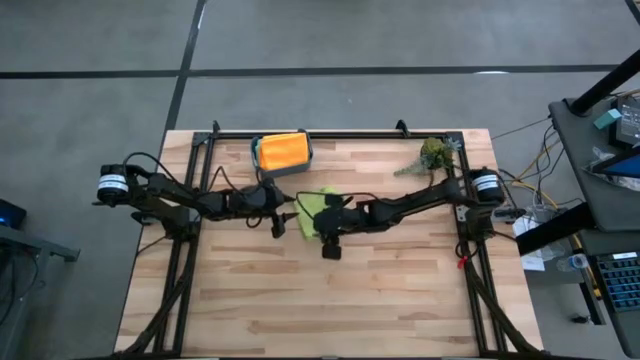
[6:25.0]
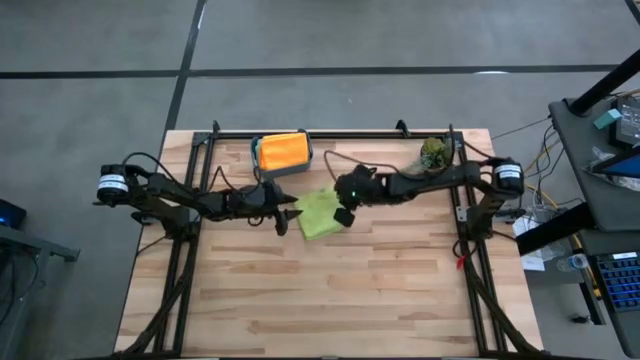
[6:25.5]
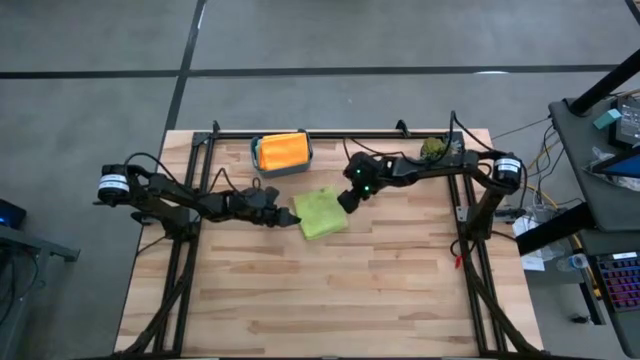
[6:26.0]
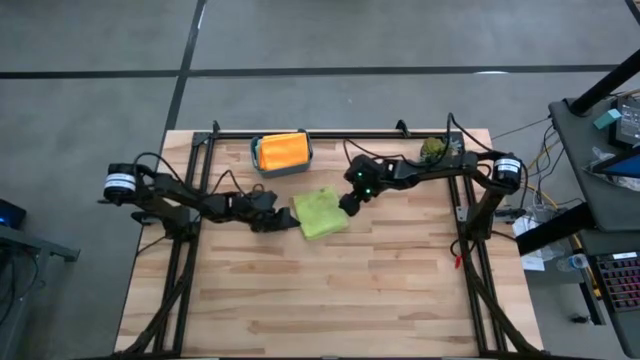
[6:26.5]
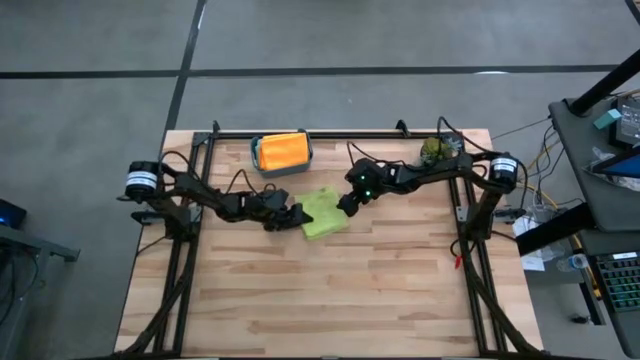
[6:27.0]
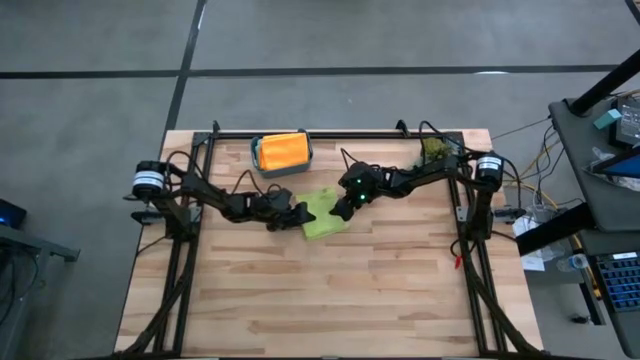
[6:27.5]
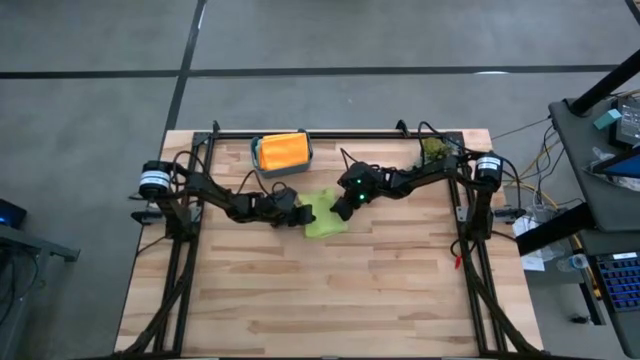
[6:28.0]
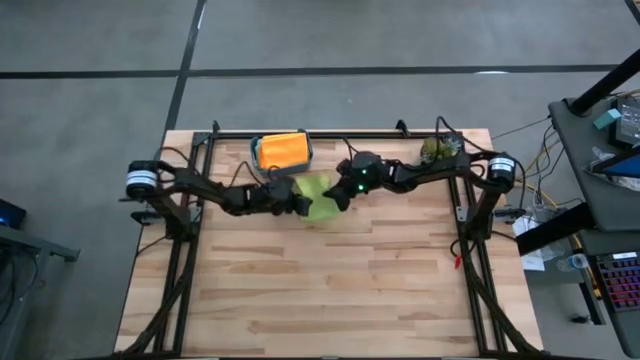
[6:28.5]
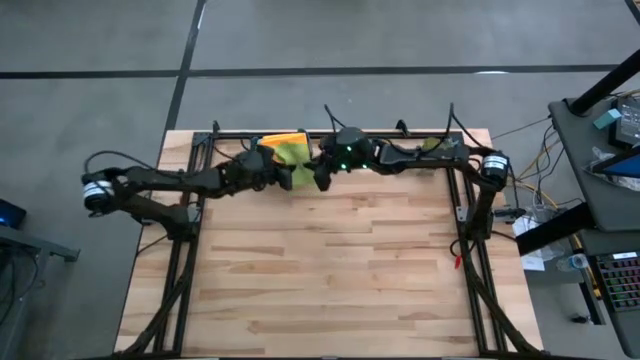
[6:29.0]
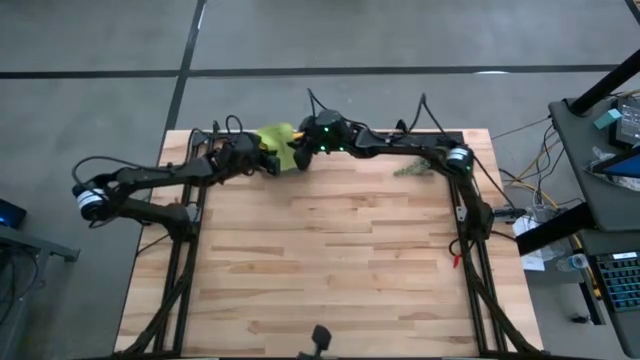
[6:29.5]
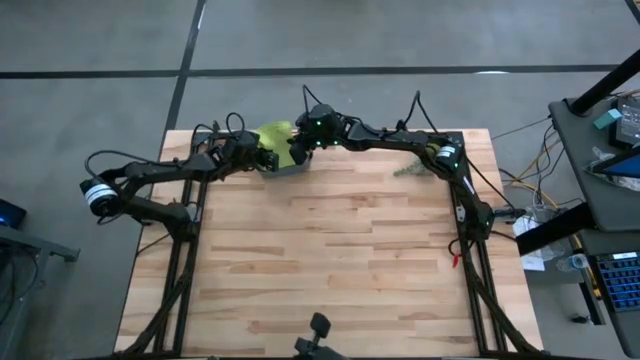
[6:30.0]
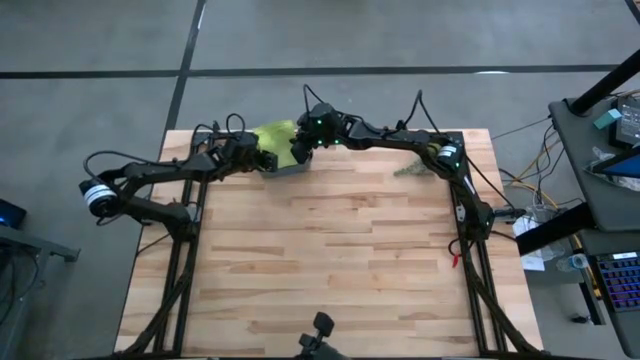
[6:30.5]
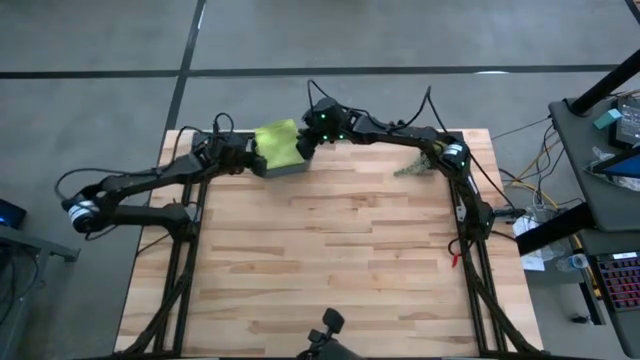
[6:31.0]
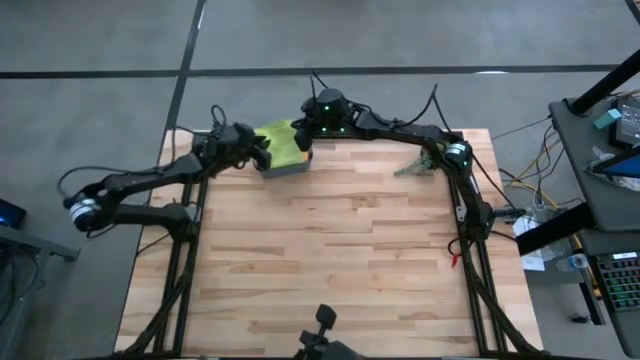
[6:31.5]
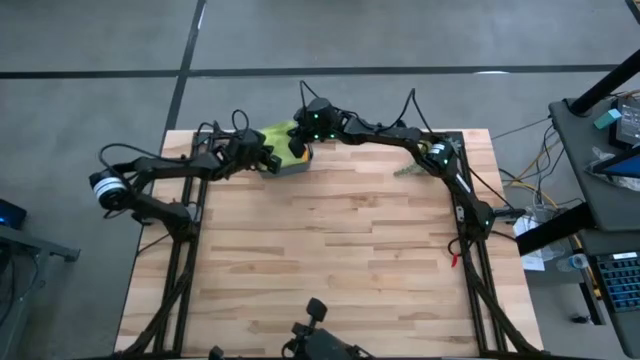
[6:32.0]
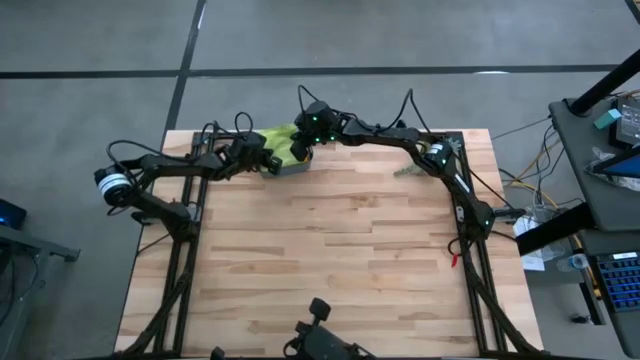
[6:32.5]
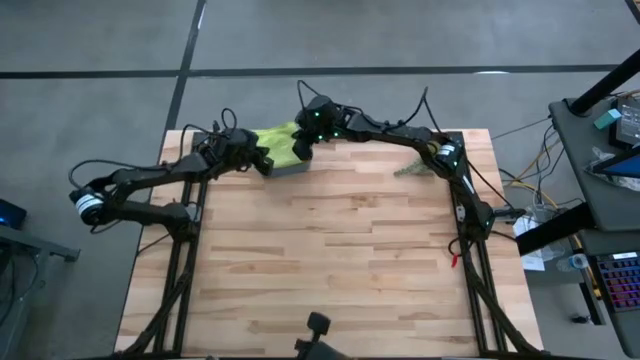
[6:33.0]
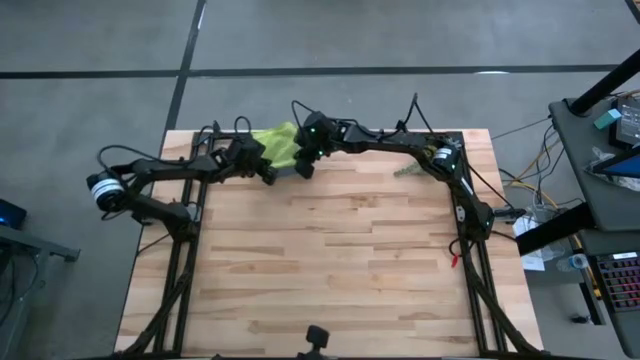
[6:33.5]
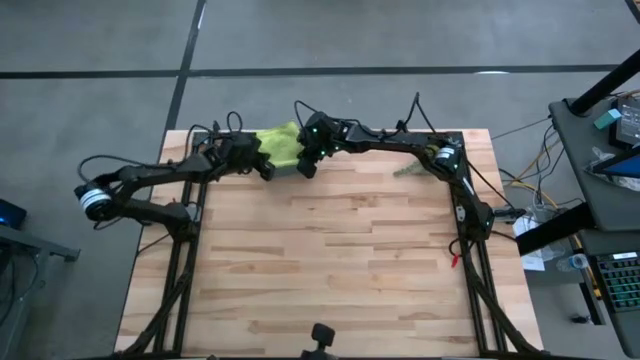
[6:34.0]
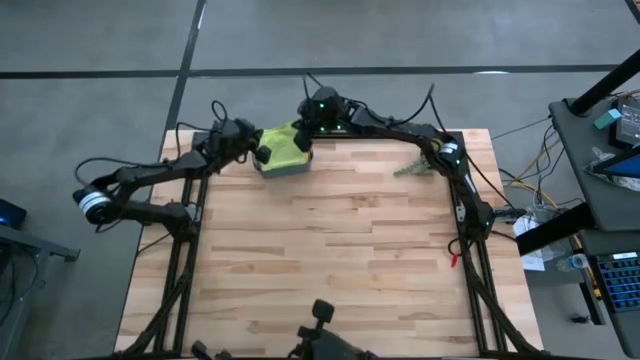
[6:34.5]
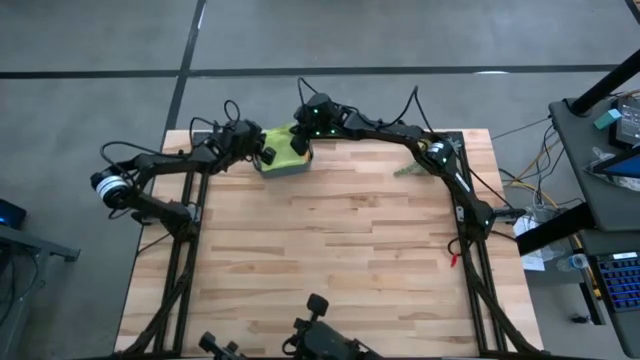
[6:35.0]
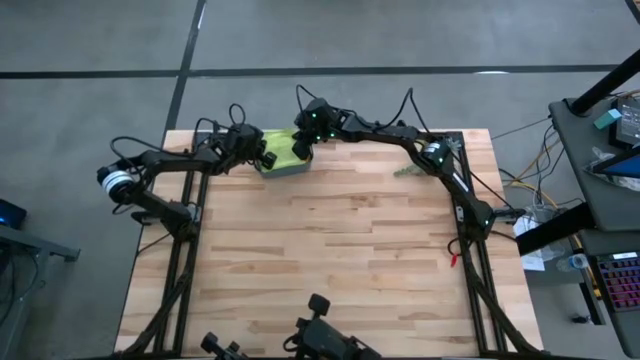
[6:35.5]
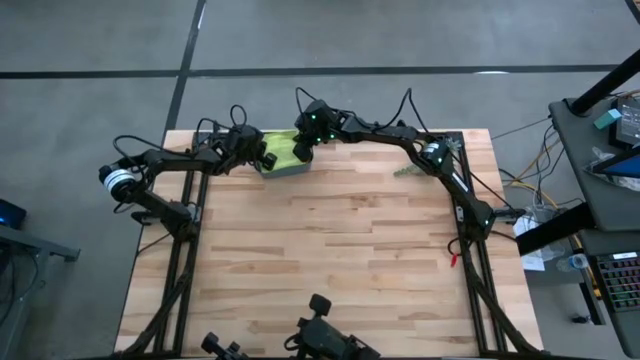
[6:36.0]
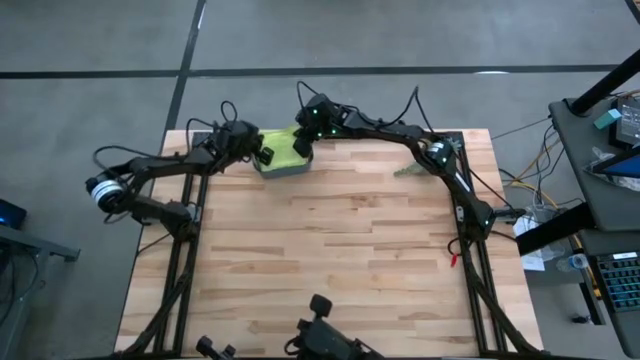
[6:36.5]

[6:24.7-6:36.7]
Task: Fold microfiber towels
Put the light green microfiber towel into the green bin

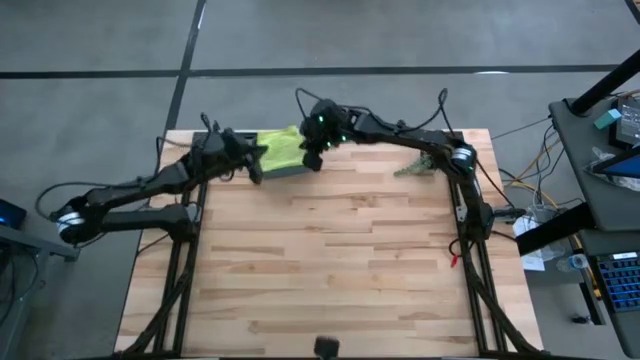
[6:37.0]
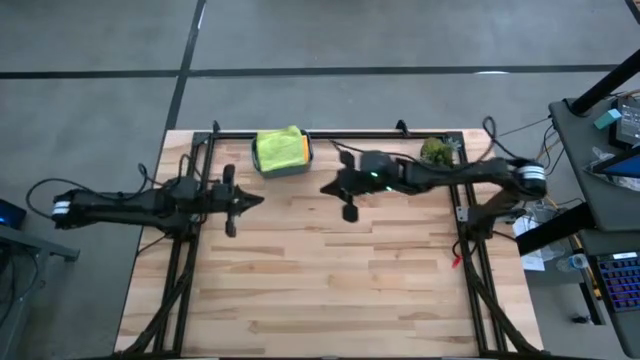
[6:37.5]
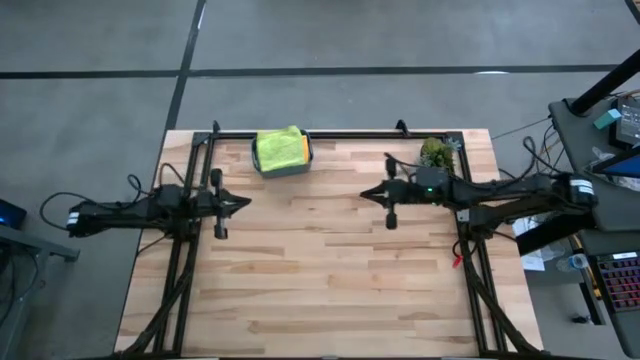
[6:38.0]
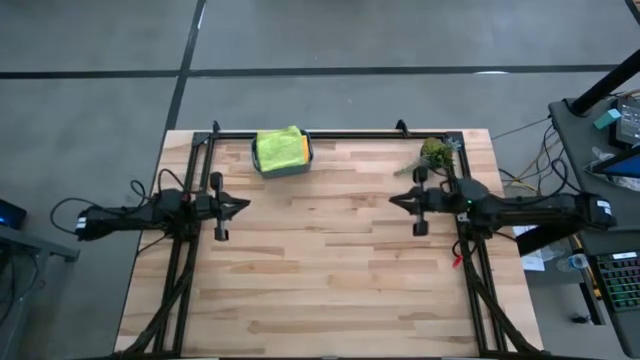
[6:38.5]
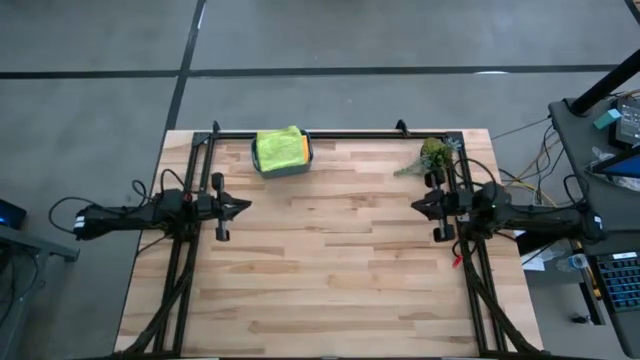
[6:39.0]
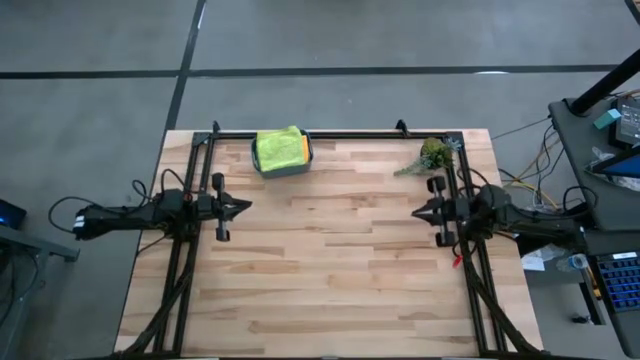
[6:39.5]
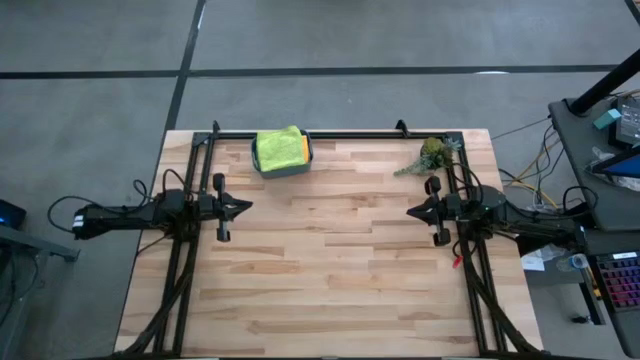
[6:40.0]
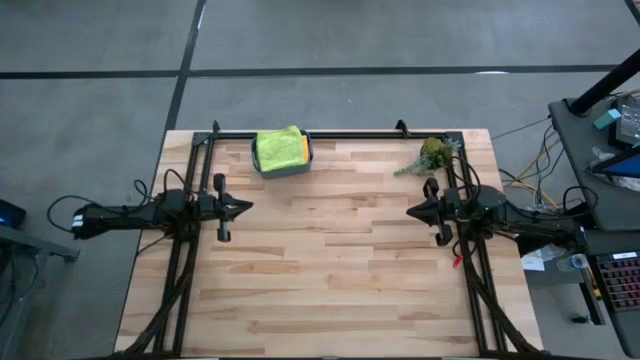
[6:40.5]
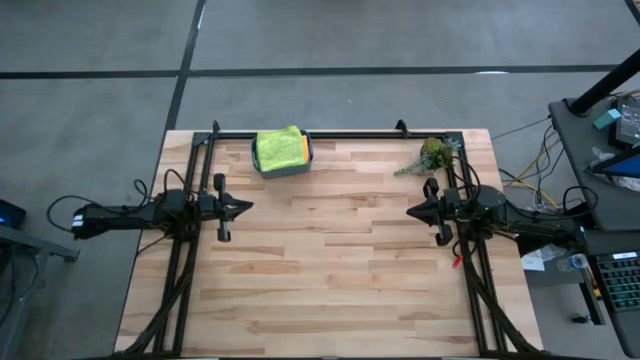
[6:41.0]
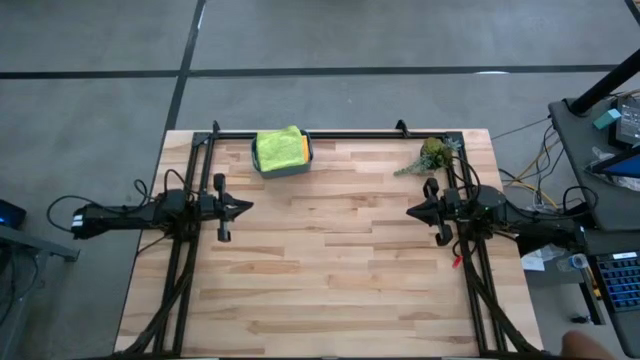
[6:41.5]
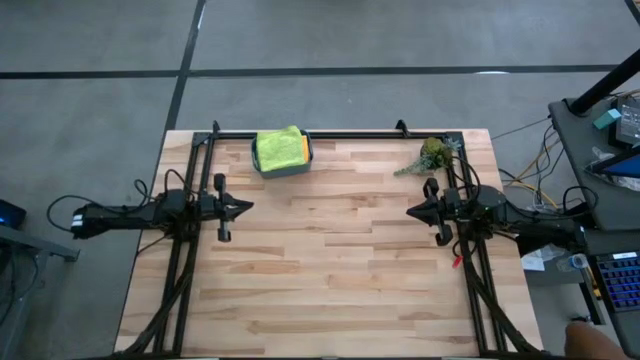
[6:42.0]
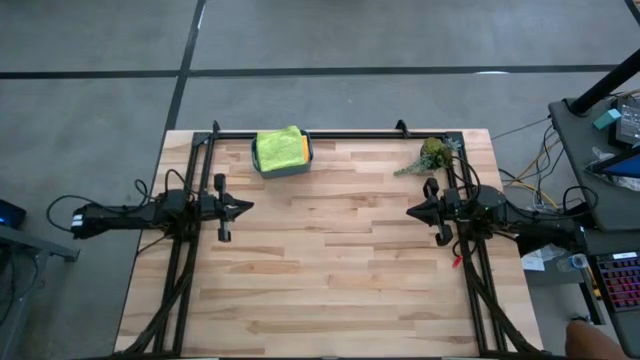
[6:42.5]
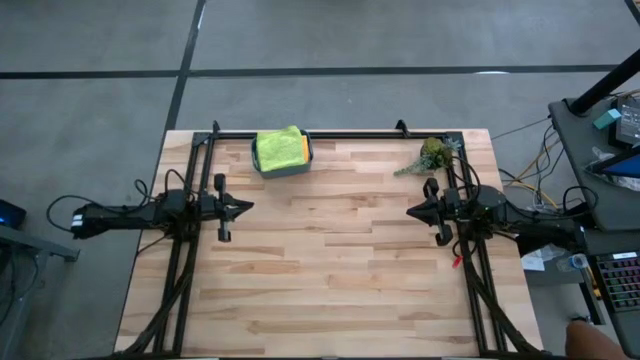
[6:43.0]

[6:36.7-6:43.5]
Return to Home Position

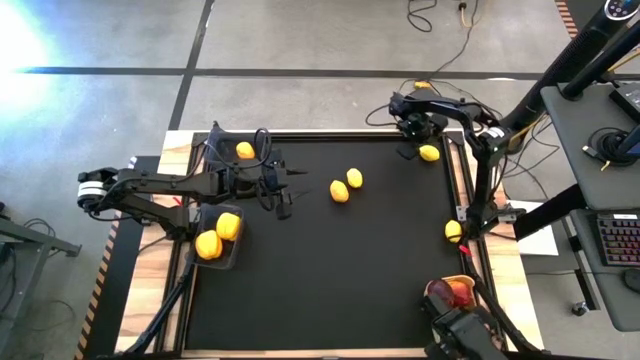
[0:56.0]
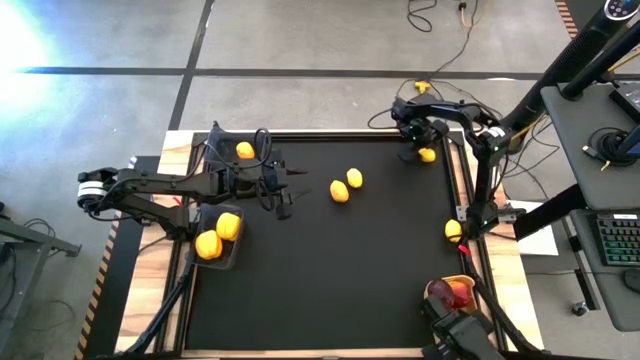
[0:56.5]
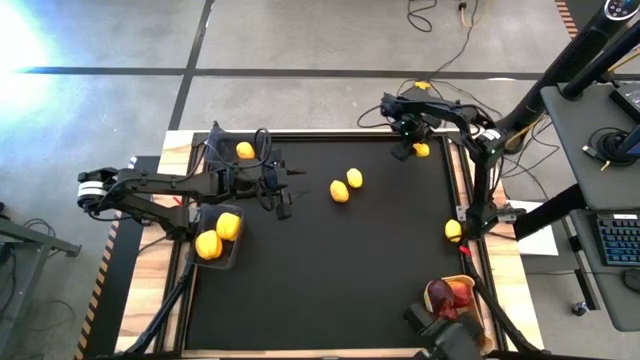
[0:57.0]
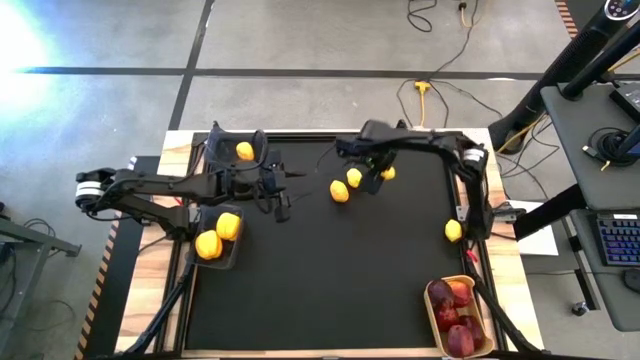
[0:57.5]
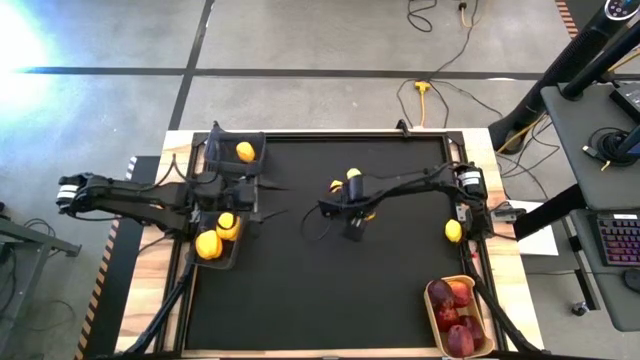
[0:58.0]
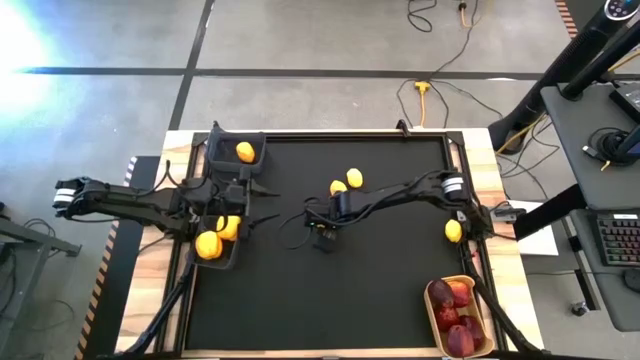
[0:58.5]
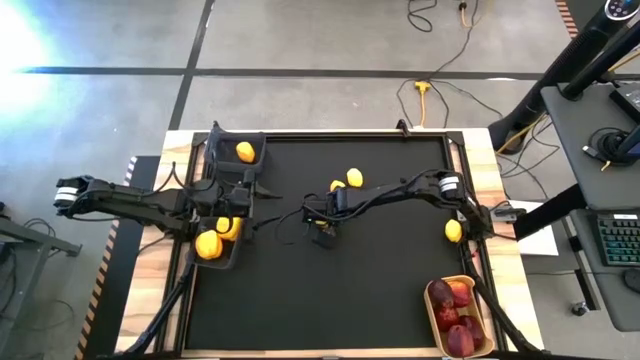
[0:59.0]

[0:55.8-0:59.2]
Task: Sort produce into baskets
Move the lemon to the center of the table
